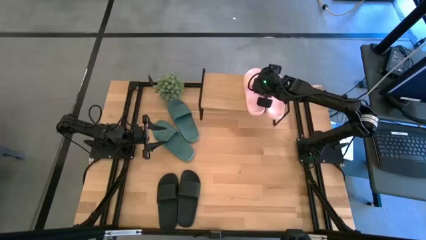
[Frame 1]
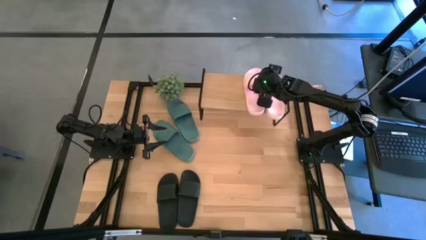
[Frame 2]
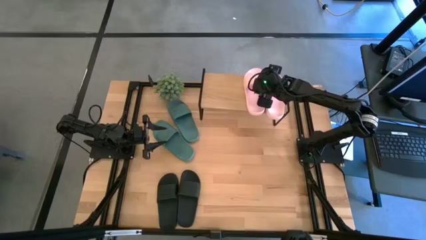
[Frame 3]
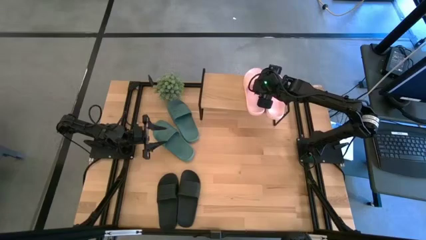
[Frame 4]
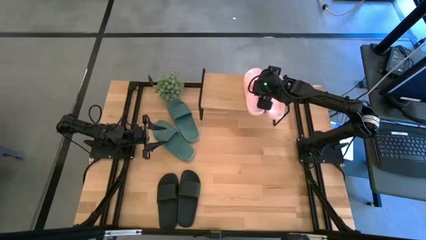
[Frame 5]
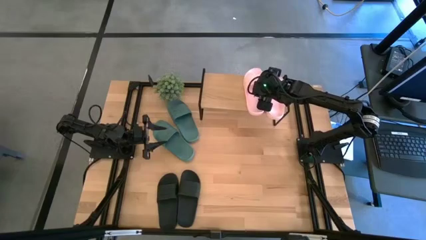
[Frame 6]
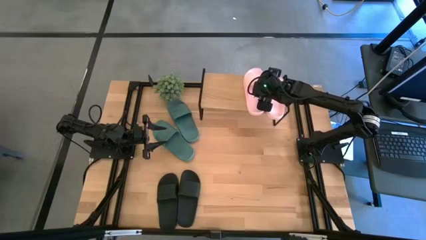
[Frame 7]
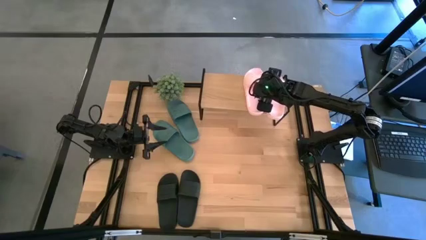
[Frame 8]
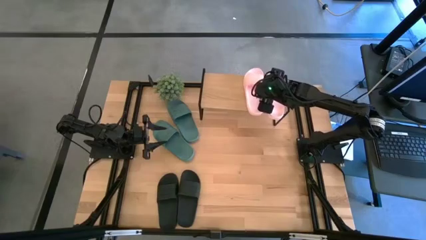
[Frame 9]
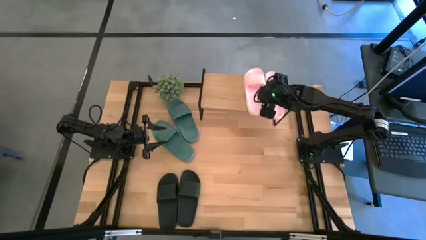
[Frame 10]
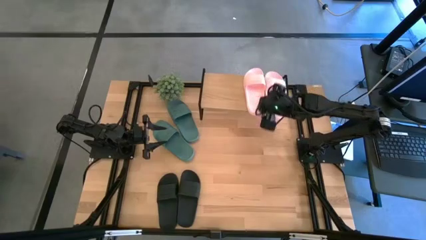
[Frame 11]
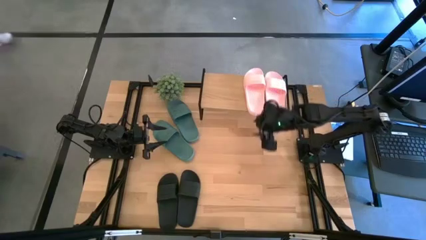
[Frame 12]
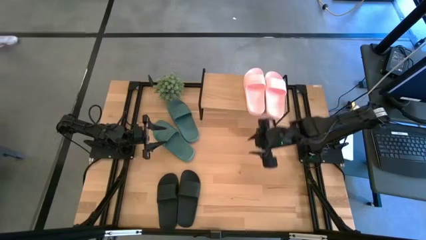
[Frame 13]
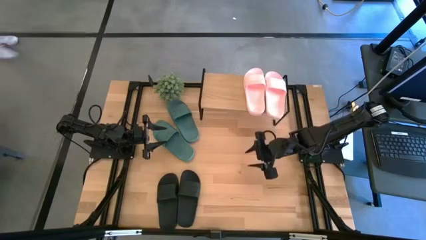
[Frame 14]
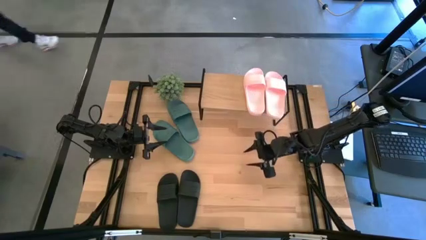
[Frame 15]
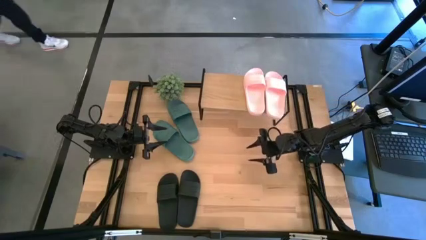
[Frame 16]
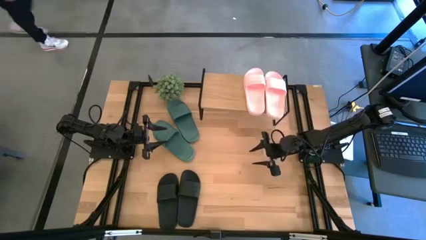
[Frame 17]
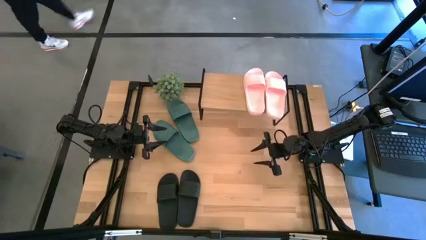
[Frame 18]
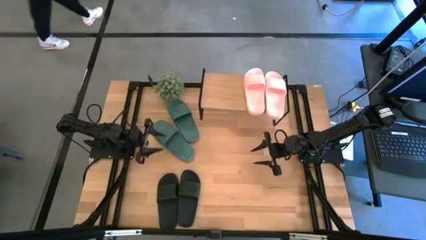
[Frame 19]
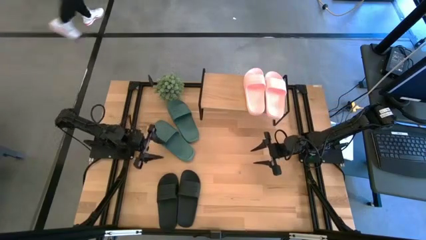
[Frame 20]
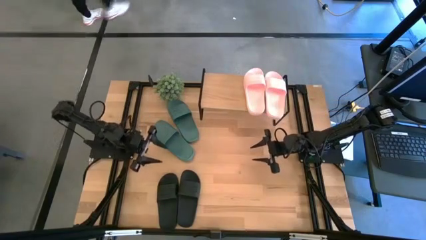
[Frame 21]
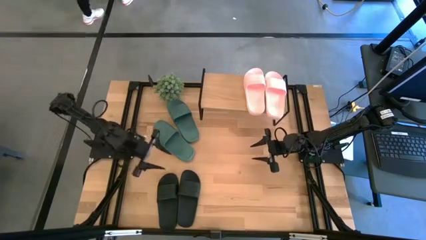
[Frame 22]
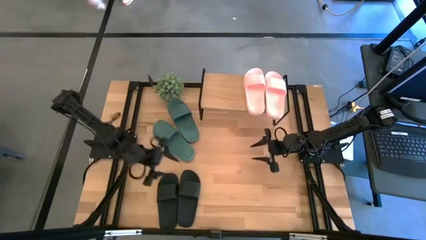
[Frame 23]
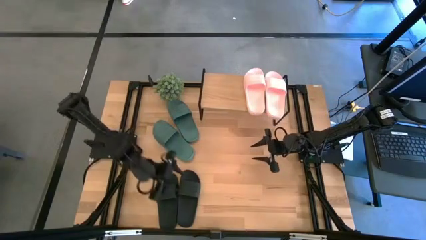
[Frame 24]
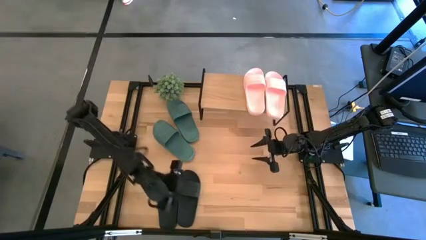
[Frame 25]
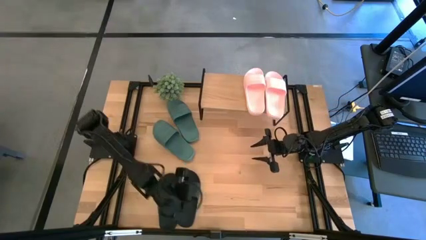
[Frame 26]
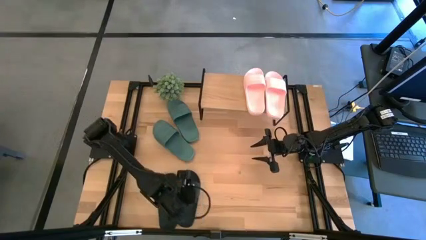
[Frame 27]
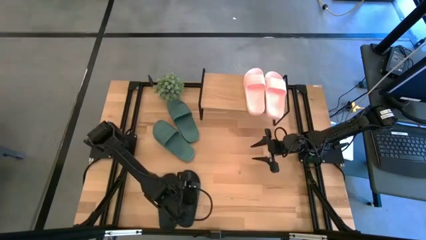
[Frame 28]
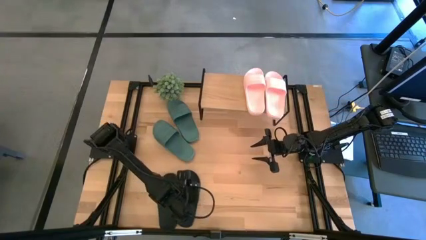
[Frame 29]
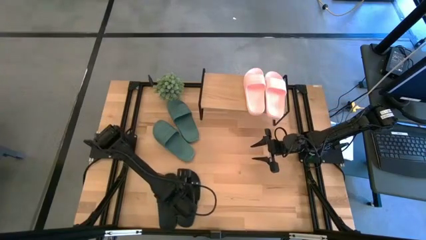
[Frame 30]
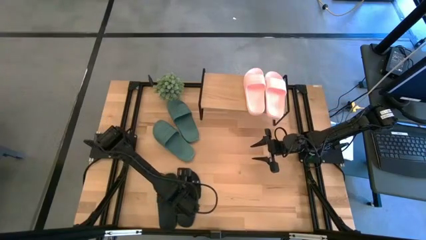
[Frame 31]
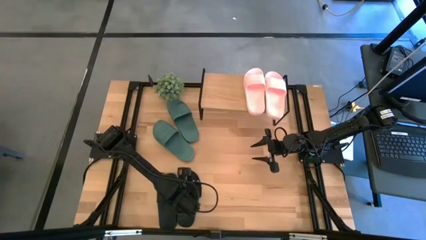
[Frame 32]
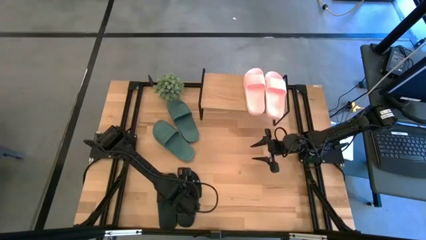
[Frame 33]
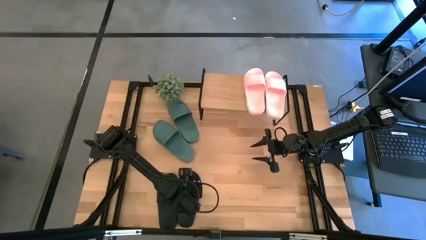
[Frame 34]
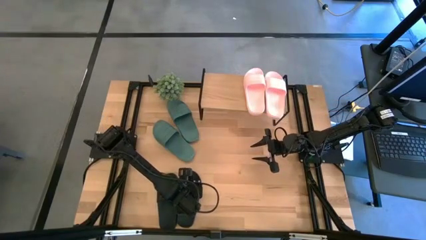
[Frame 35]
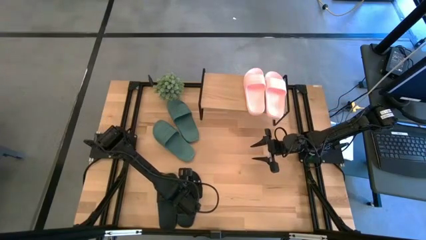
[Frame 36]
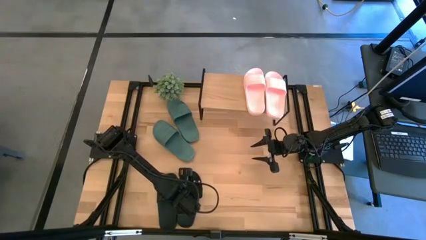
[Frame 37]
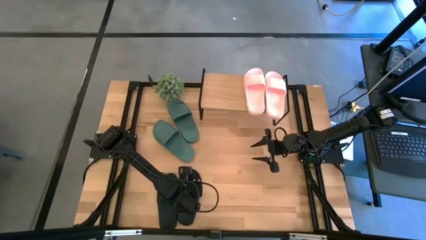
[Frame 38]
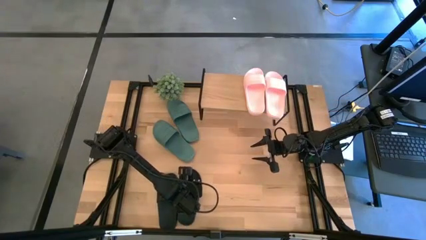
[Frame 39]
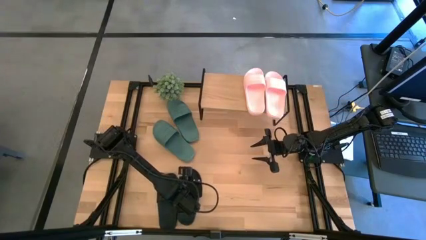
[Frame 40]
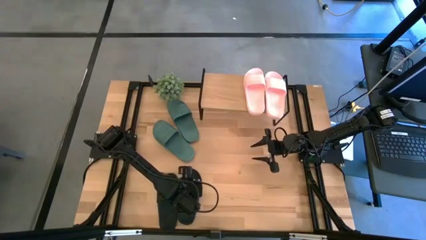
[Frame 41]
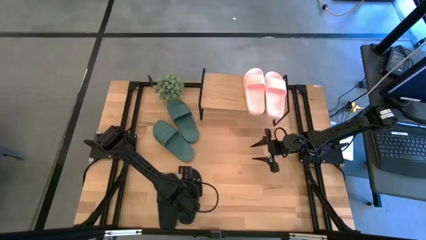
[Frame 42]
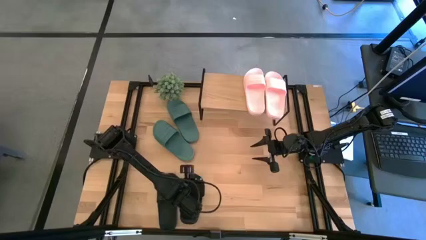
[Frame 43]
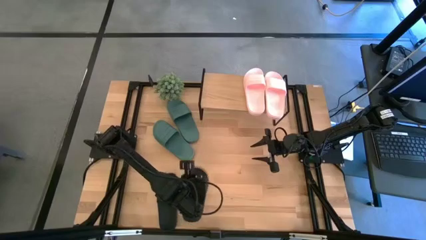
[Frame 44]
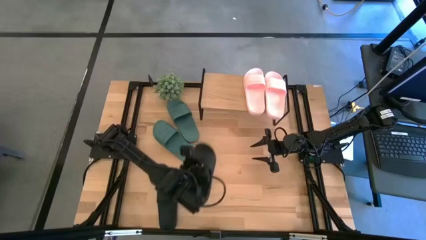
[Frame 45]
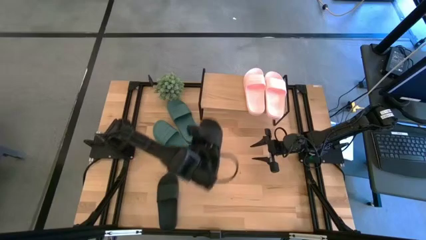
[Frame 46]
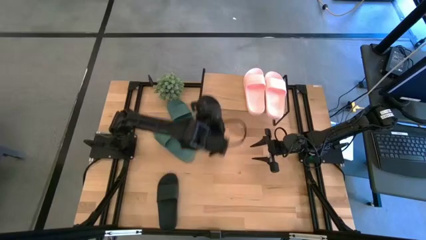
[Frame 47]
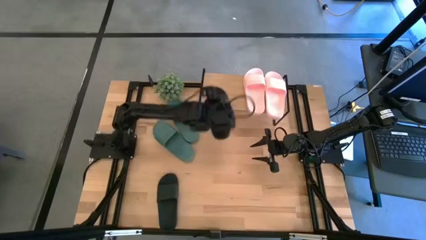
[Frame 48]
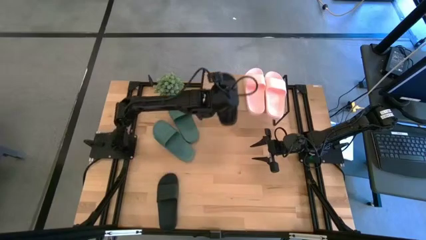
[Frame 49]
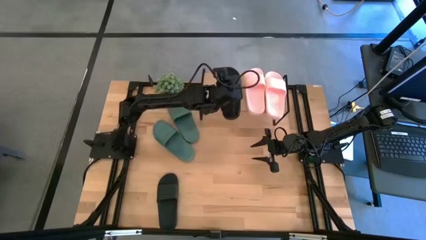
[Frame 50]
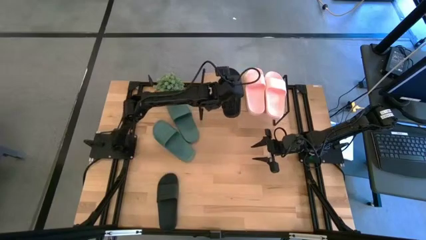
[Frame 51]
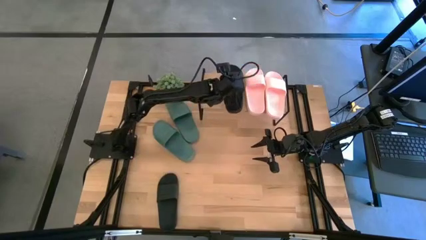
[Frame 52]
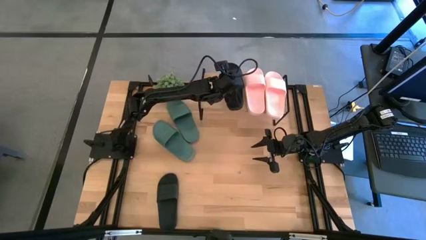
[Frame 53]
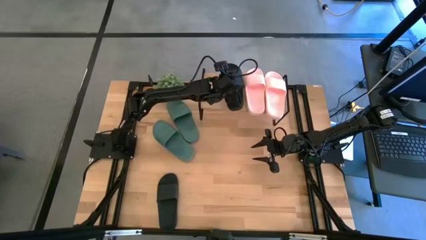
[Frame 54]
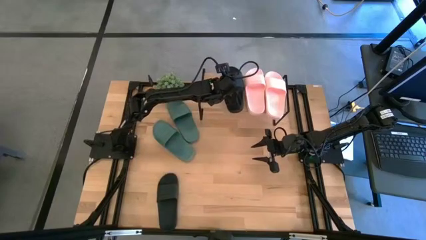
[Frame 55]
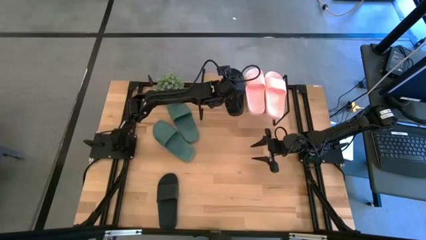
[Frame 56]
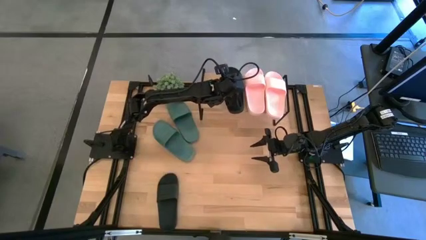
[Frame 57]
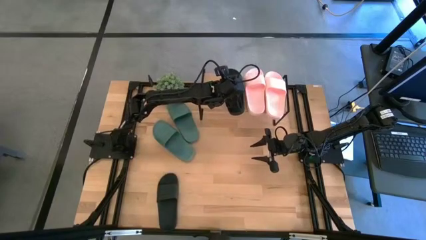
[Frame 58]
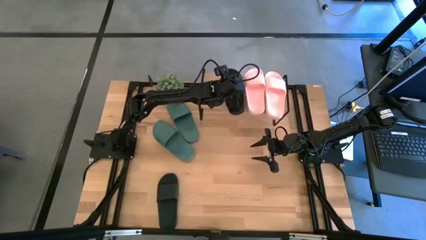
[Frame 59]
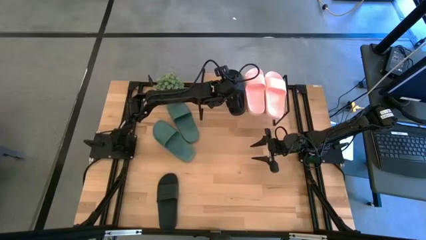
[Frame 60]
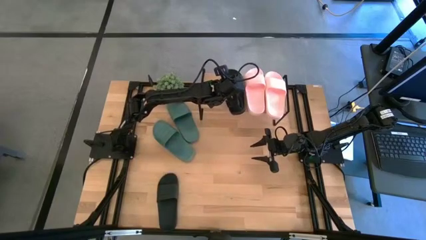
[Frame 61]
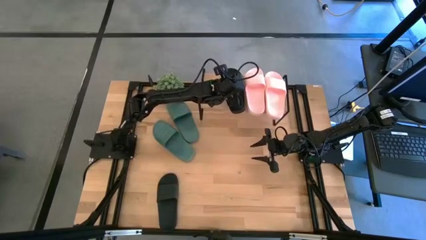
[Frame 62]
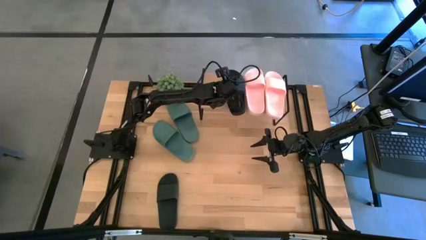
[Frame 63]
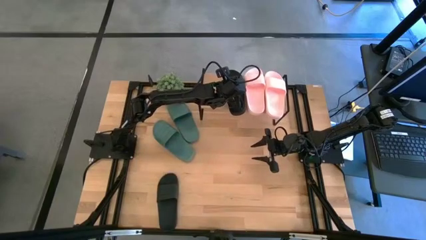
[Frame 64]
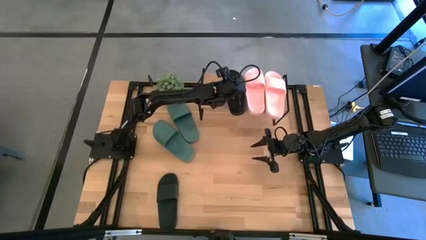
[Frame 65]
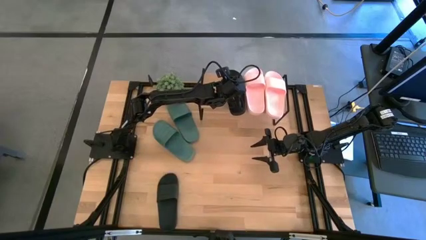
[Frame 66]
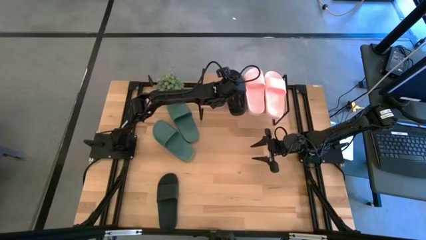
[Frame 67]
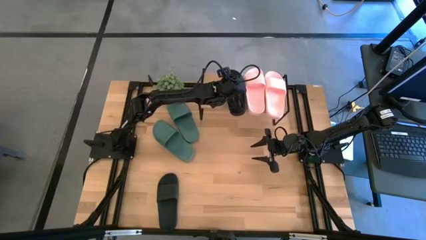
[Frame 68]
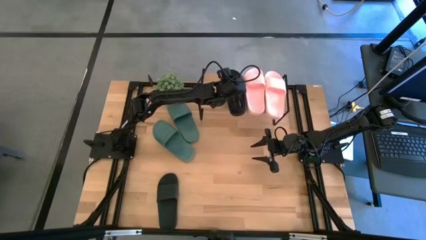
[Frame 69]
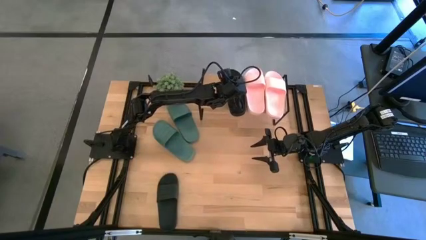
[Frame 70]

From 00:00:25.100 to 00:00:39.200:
Task: Pick and place slides into the shelf
Put the right black slide on the shelf
